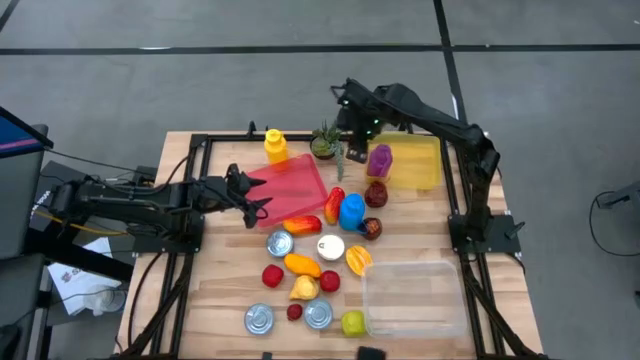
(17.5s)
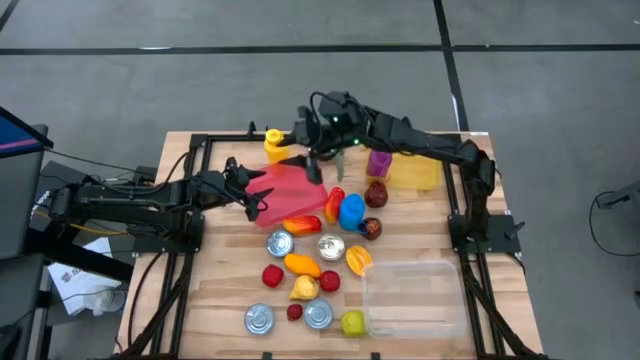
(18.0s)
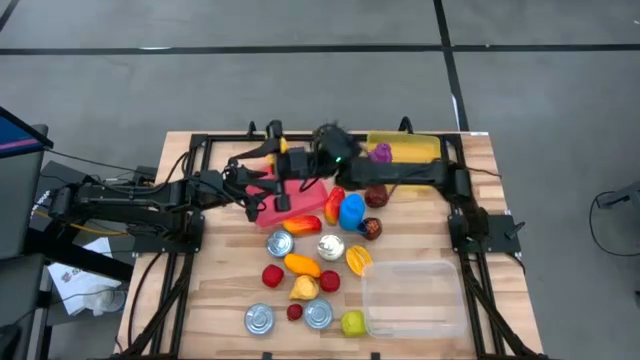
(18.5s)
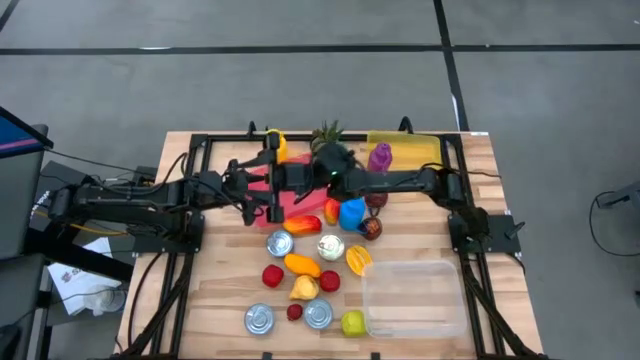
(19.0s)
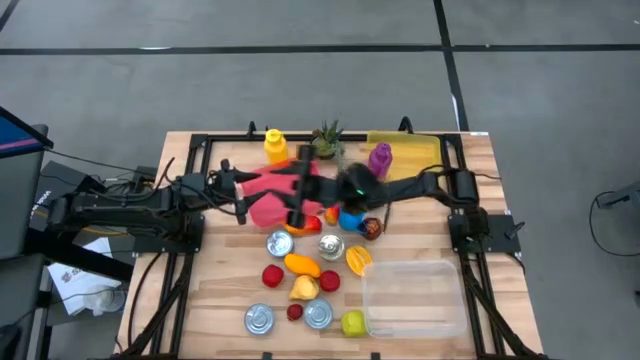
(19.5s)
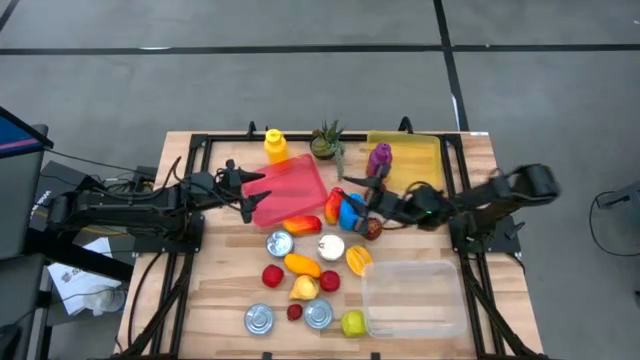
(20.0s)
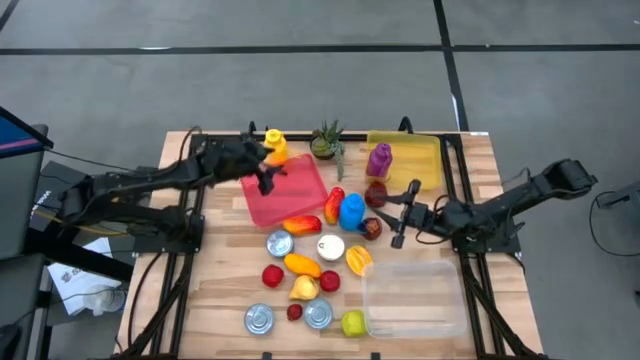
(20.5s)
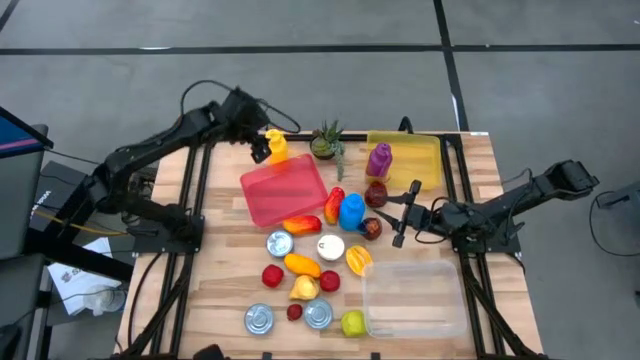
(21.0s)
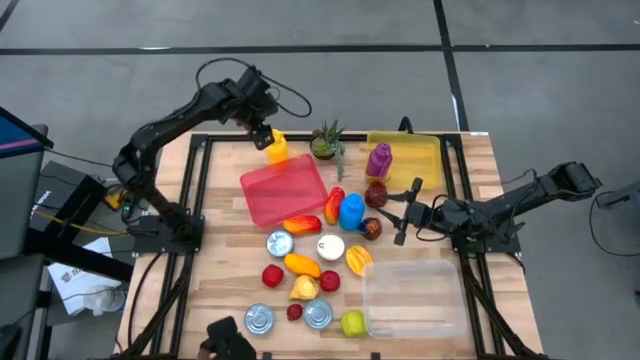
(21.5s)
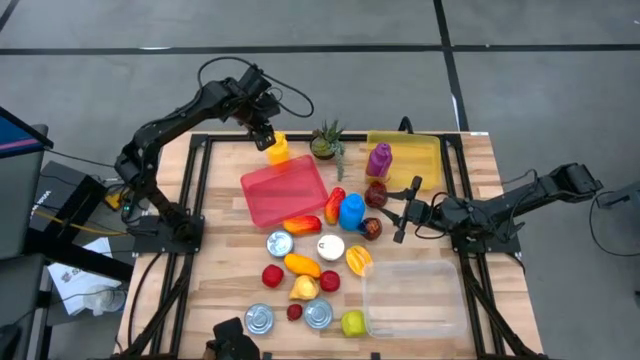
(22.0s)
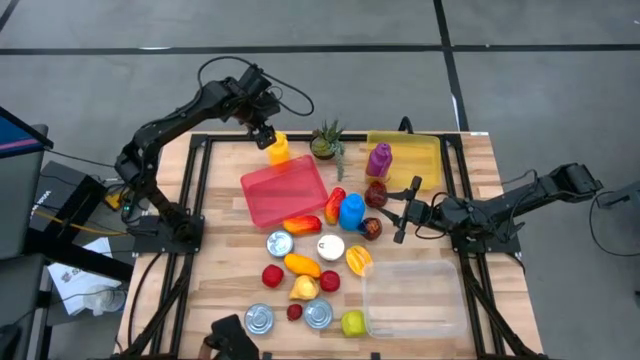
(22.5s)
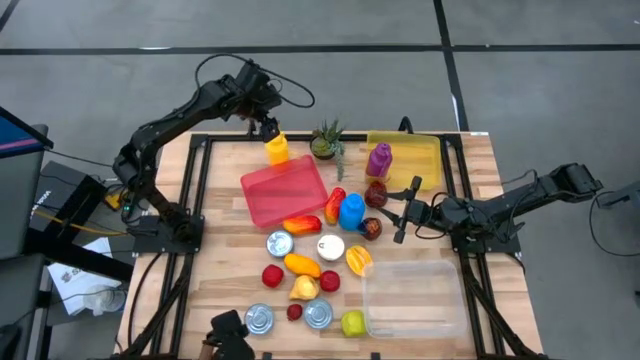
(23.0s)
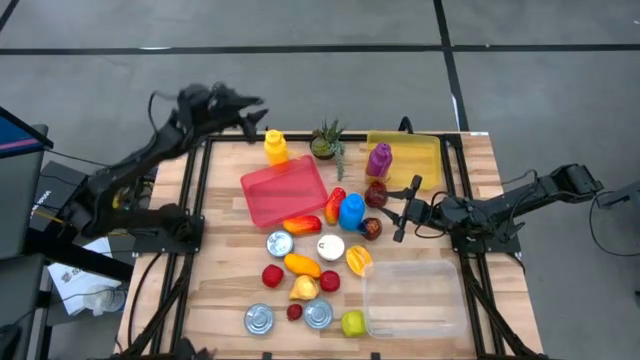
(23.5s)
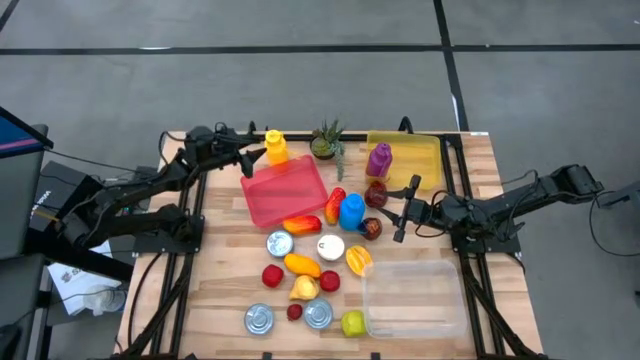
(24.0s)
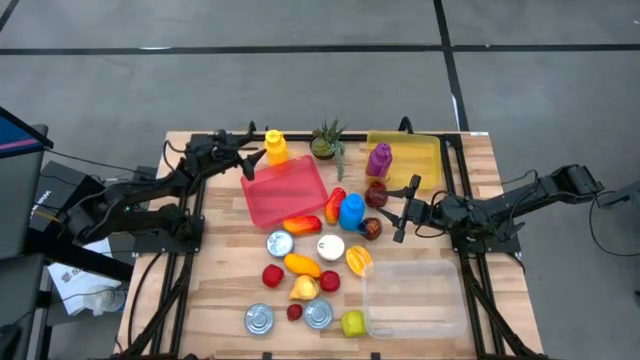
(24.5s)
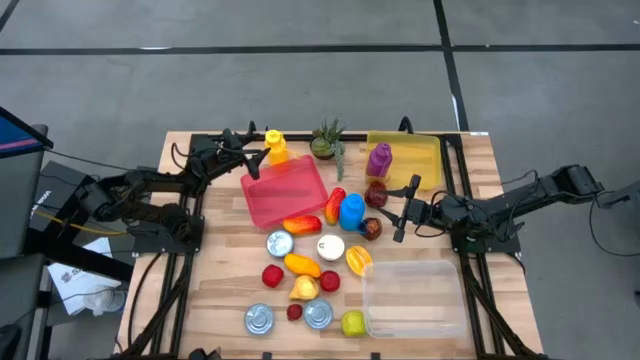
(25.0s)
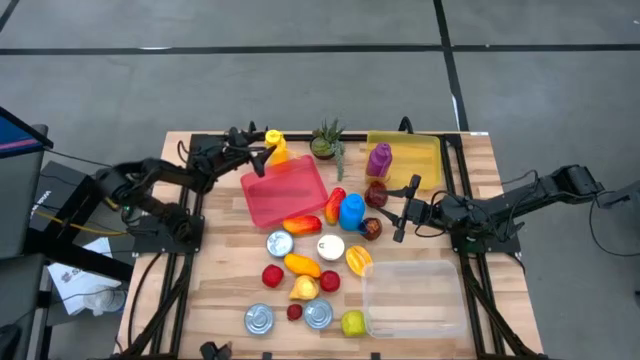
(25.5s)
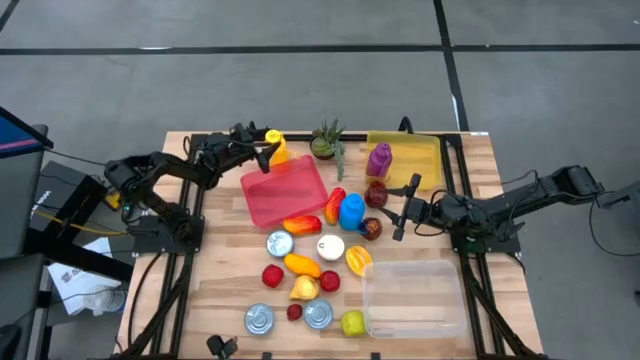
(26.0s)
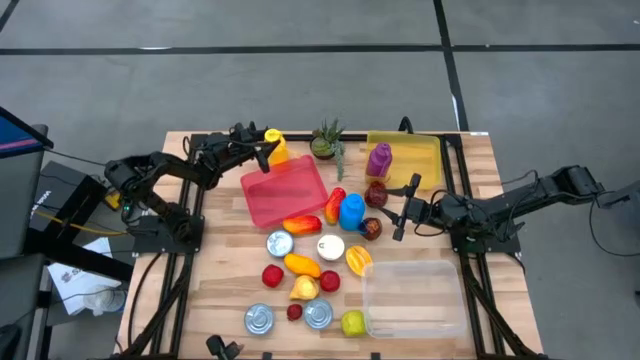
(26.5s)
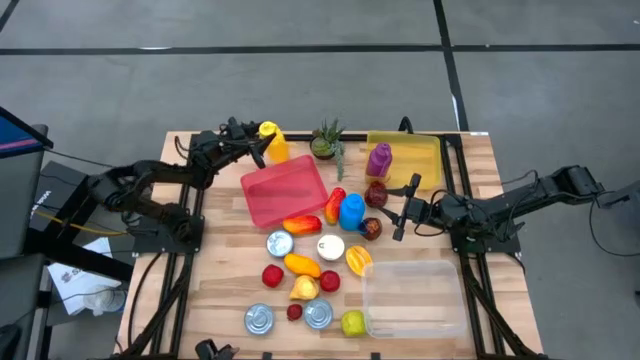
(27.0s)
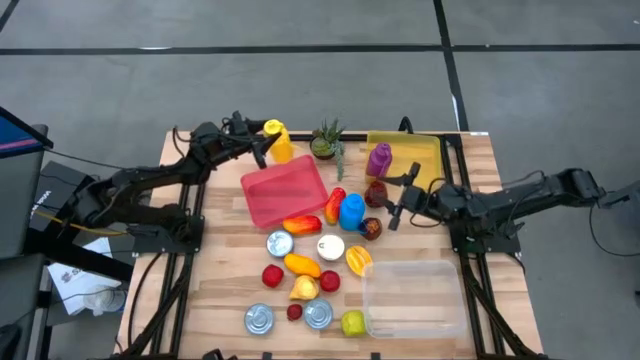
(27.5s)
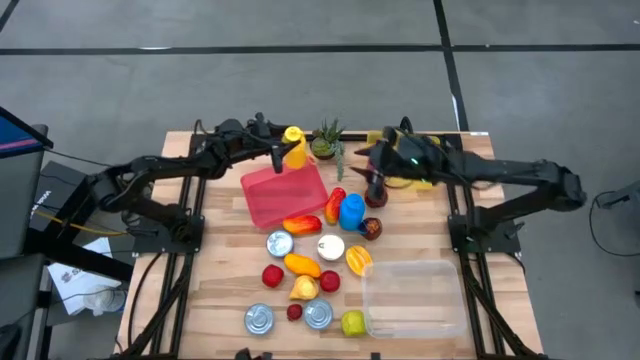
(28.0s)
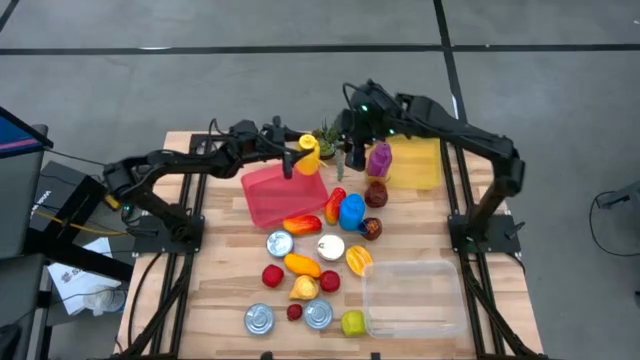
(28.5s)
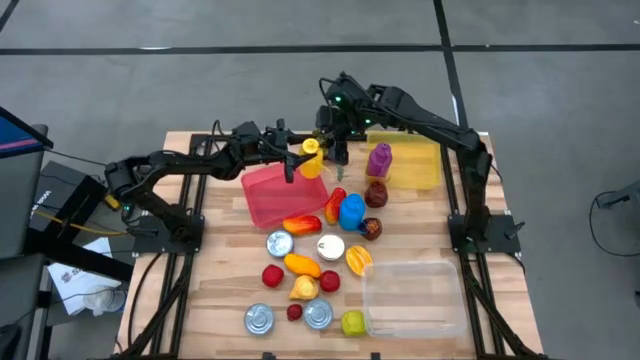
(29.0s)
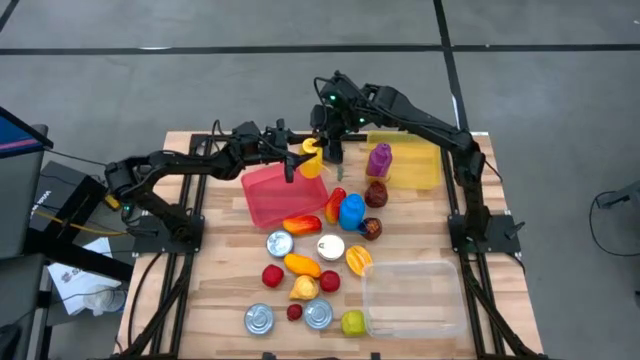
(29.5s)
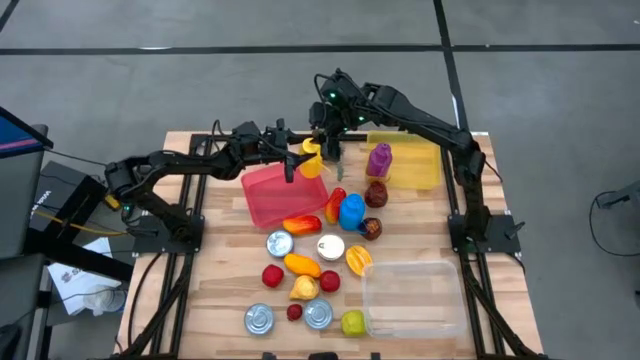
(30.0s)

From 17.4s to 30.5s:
Task: Pick & Place Food Item
Put the yellow water bottle into the yellow bin
